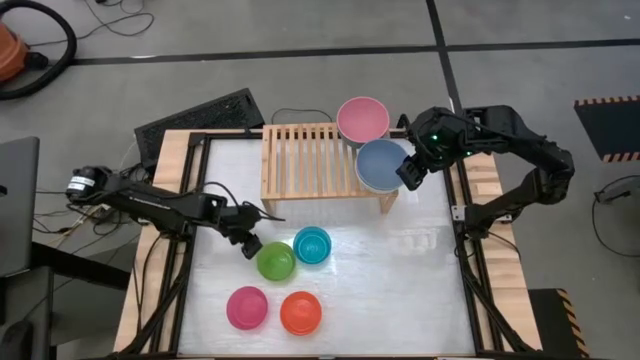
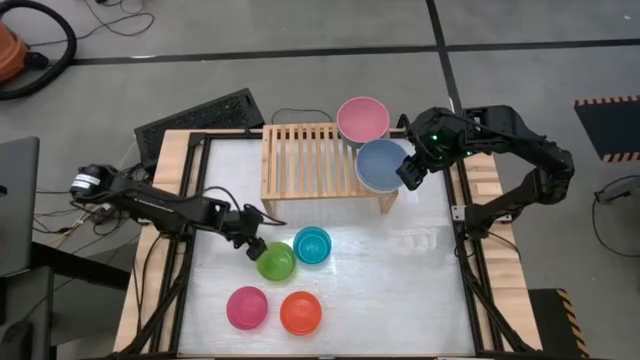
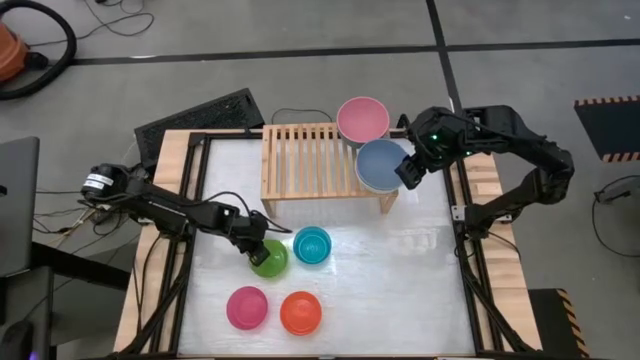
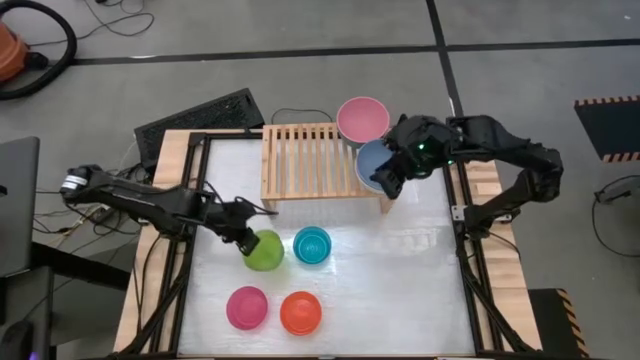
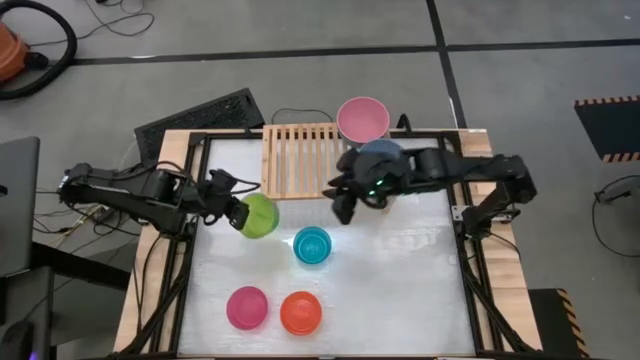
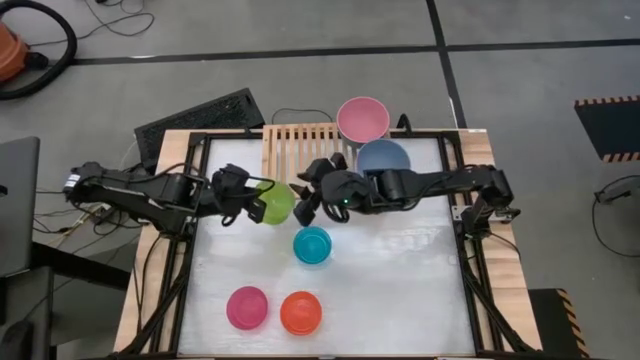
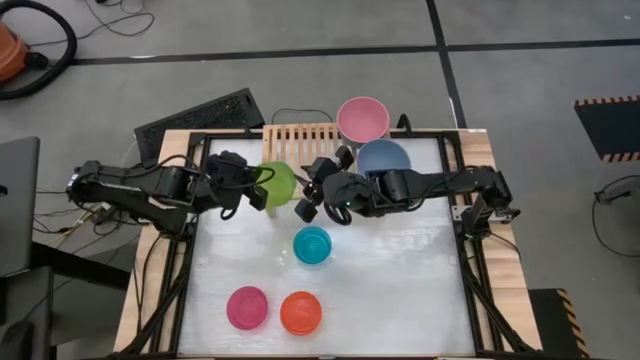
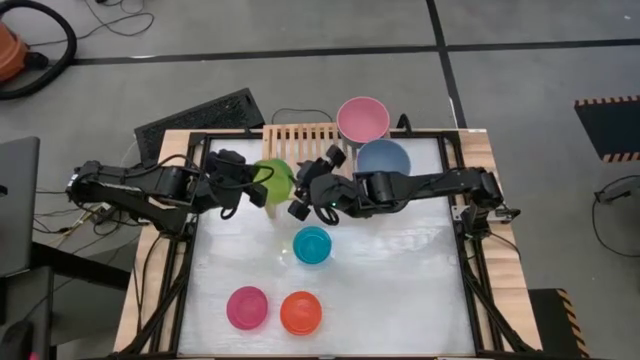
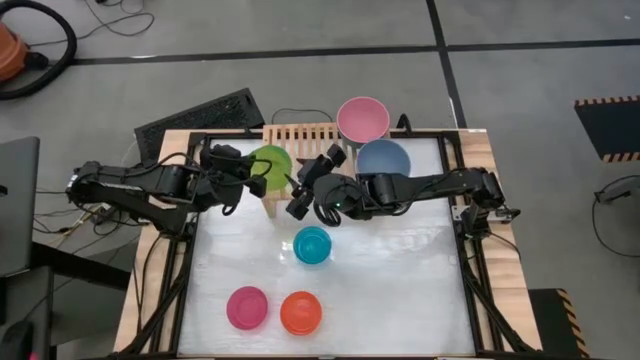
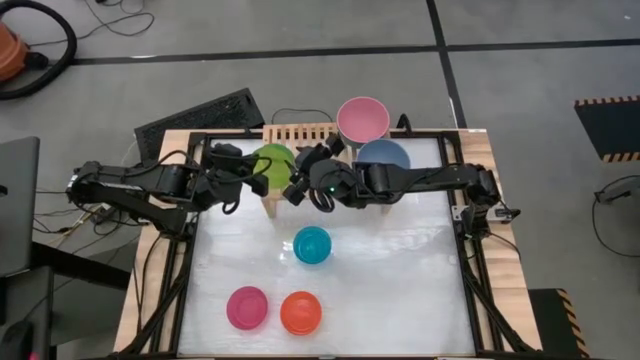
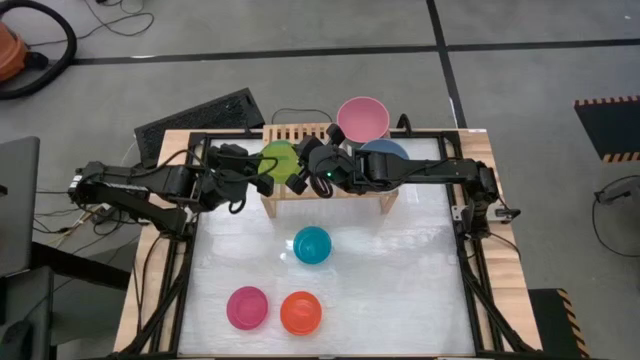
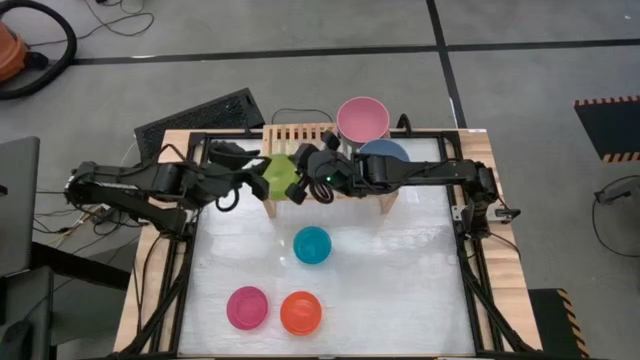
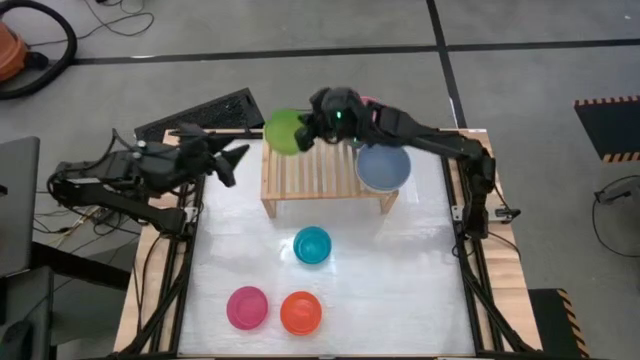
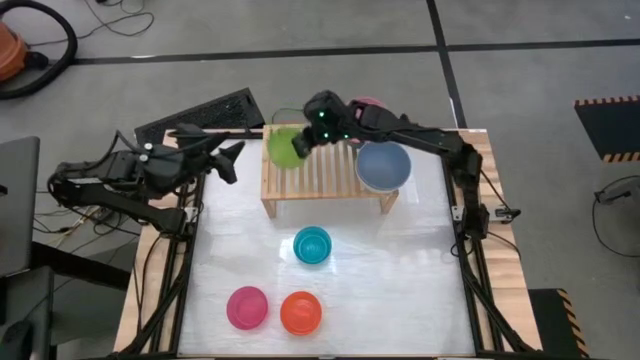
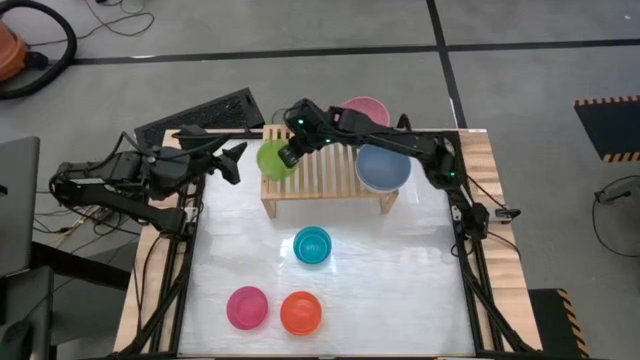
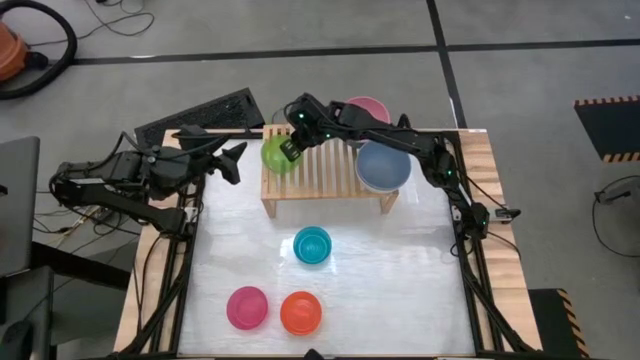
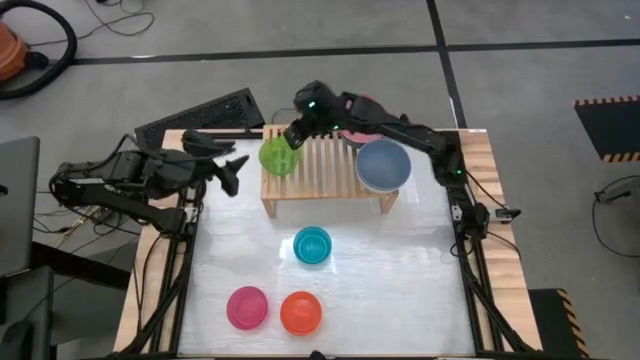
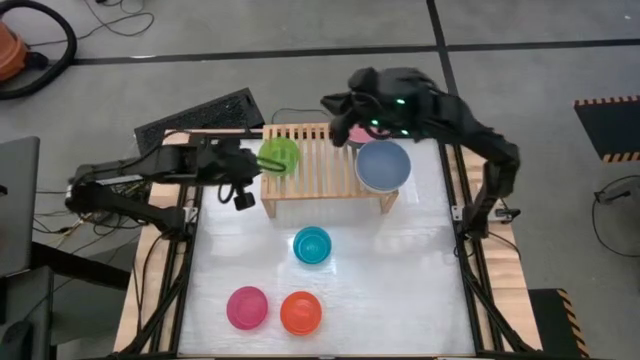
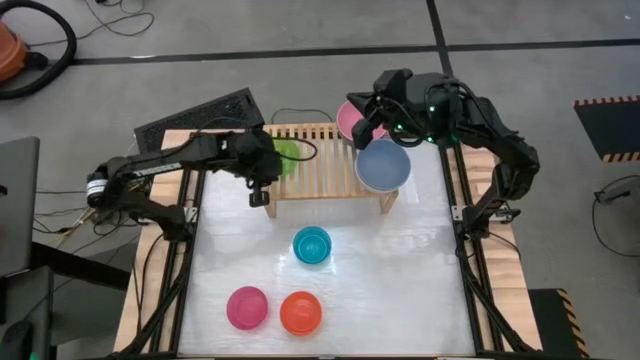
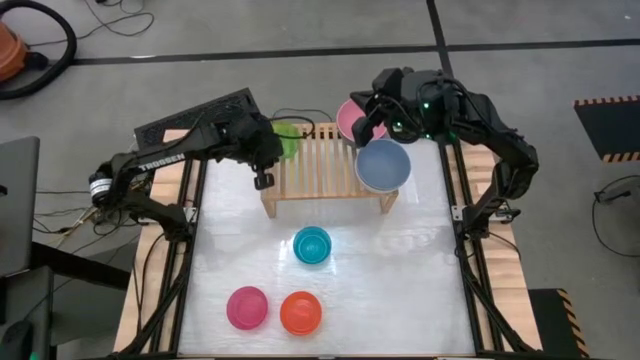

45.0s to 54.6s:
Task: Place and stack bowls onto a shelf
Put the small green bowl on the shelf

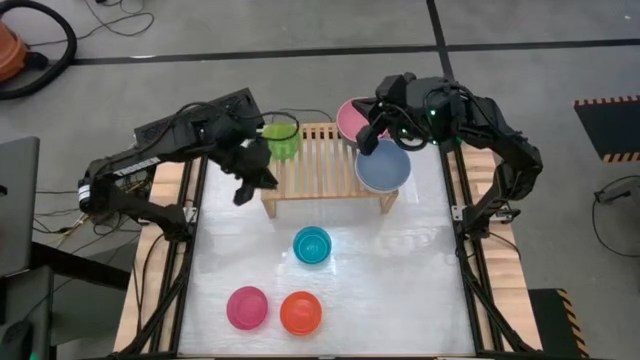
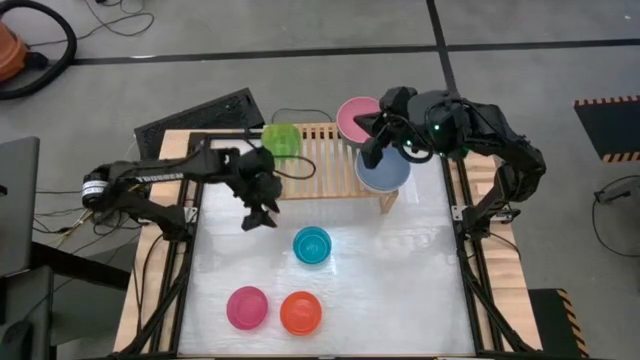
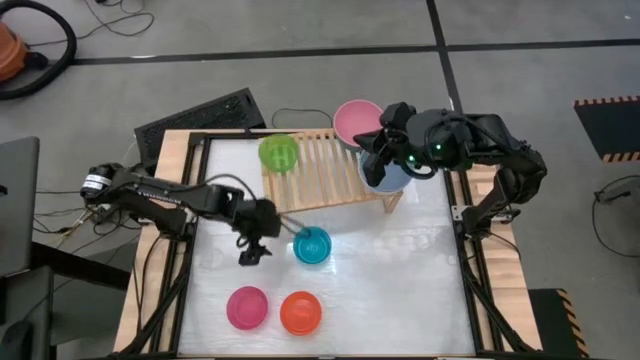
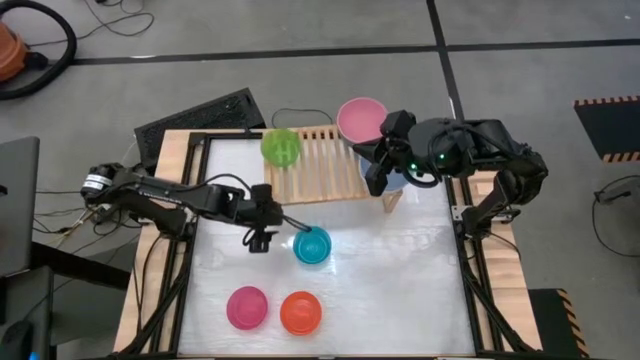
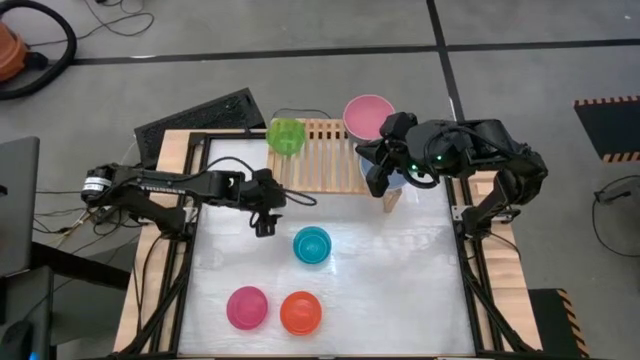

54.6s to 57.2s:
Adjust the shelf

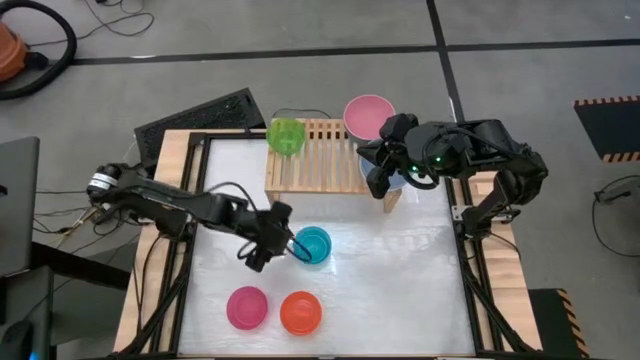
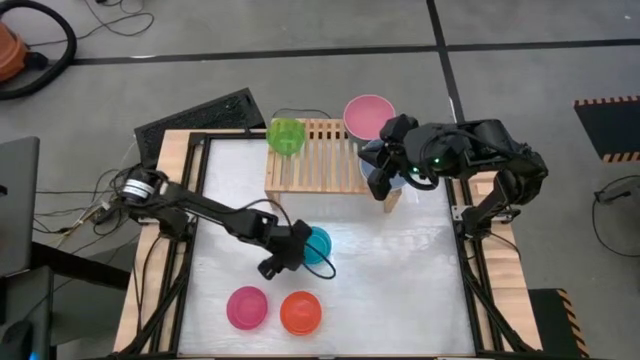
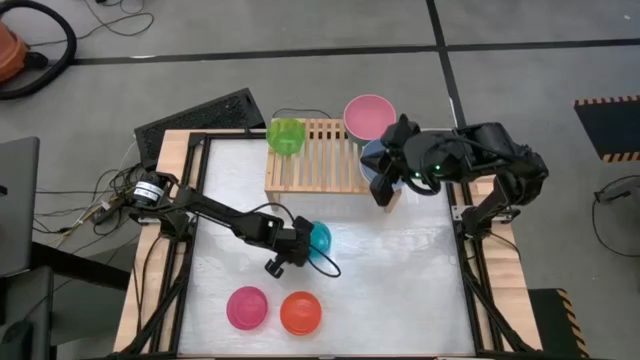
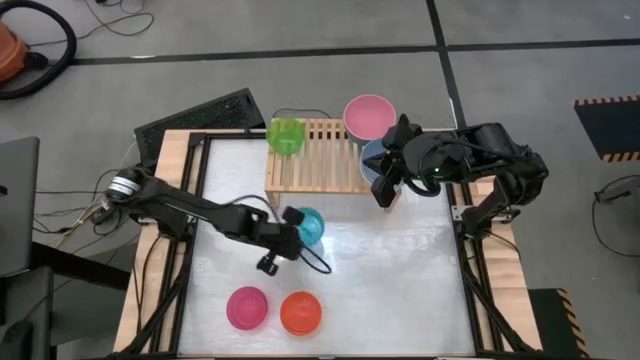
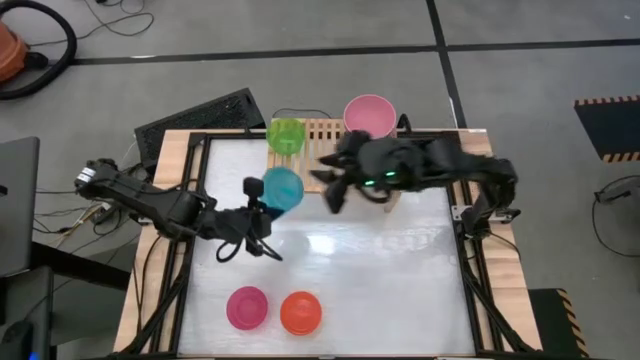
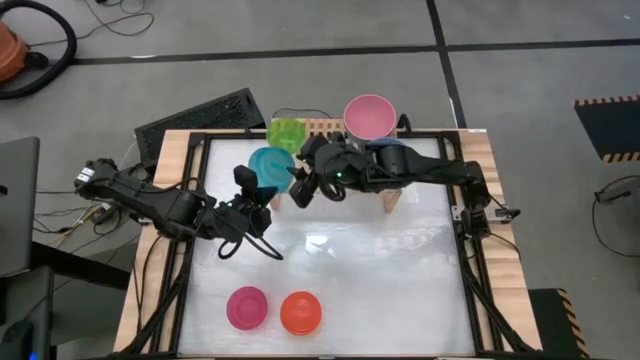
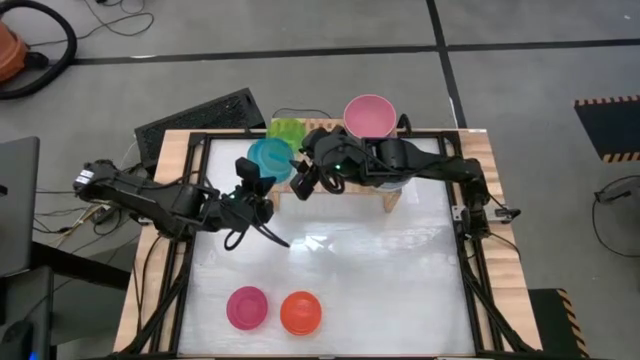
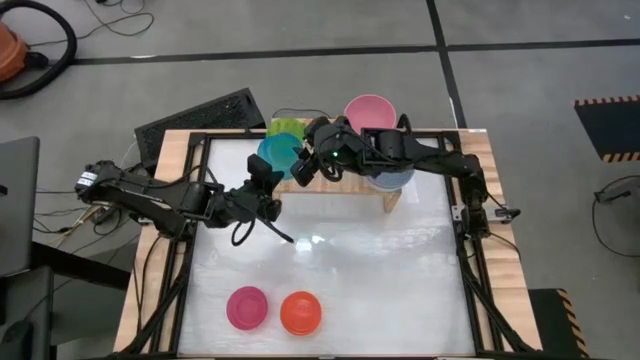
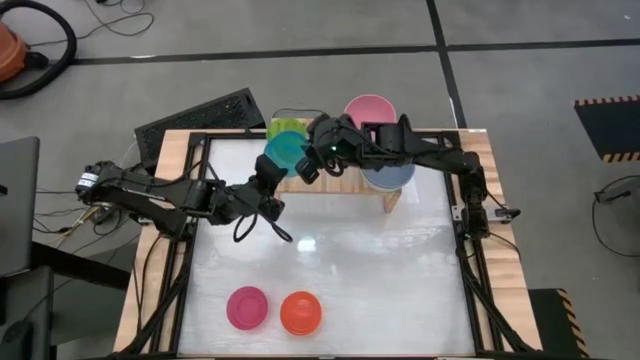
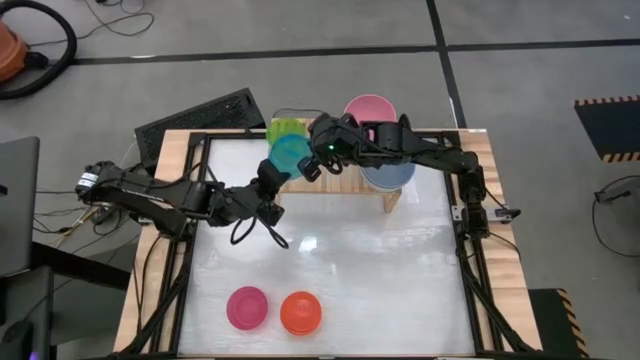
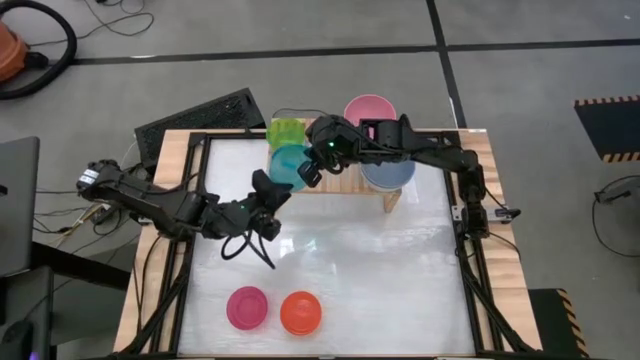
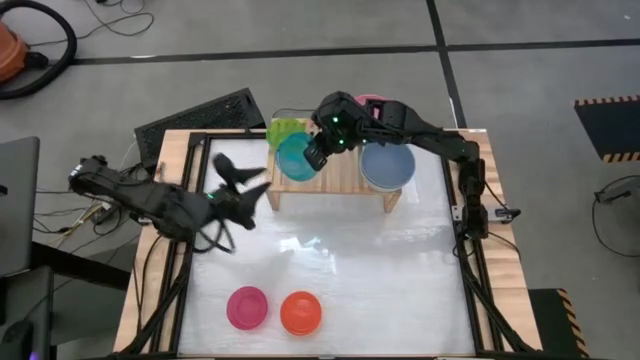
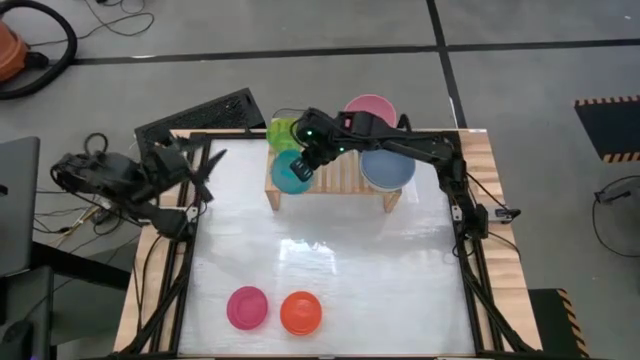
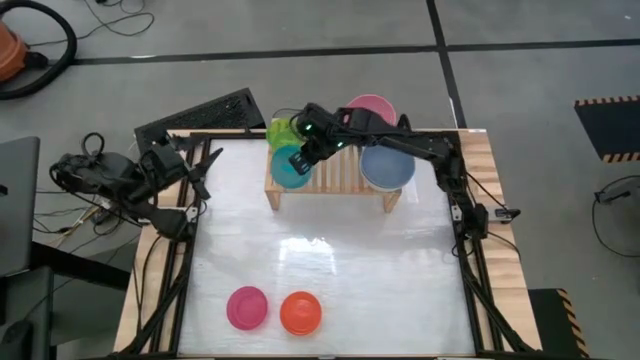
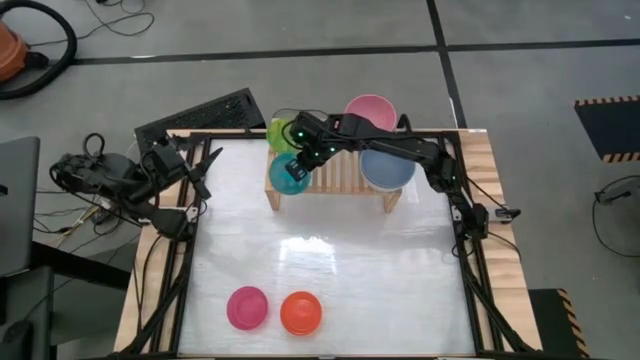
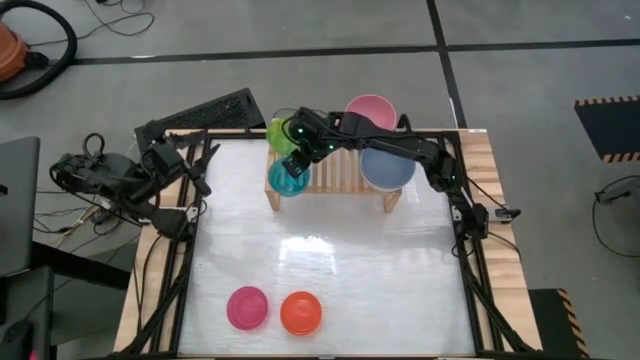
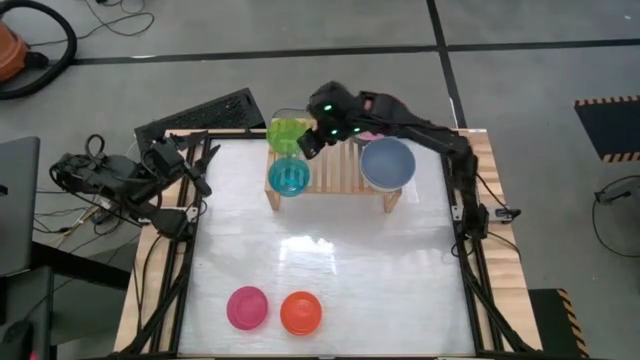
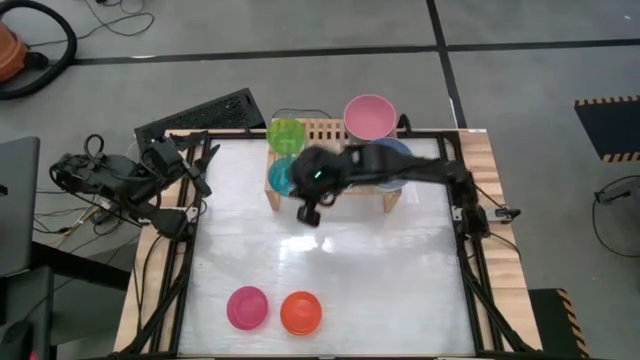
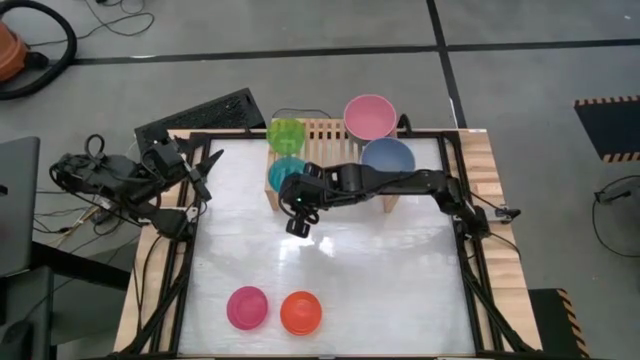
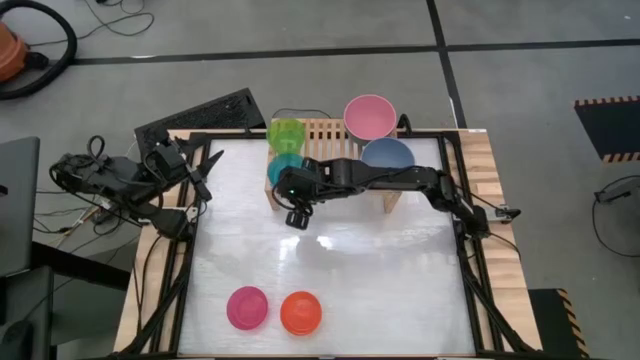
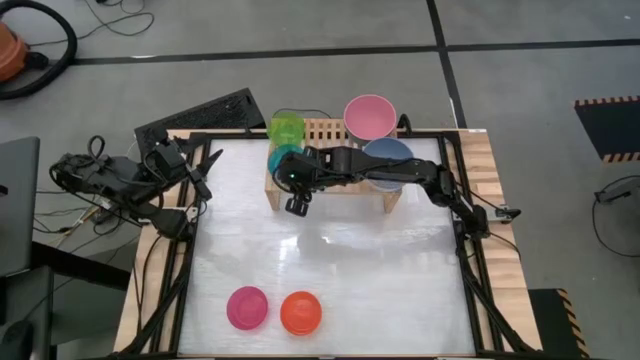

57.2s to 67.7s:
Put the small blue bowl on the shelf
